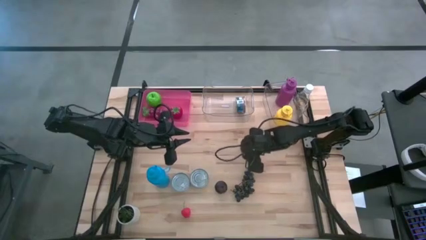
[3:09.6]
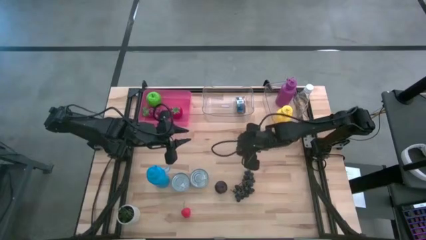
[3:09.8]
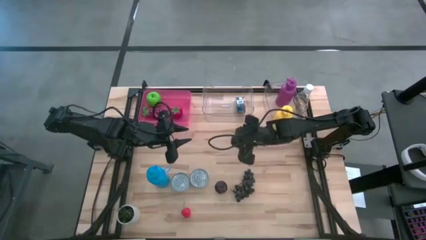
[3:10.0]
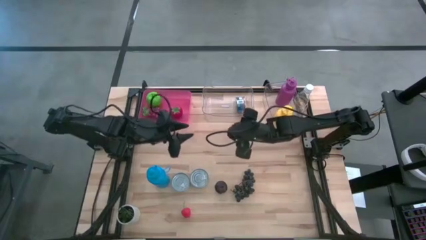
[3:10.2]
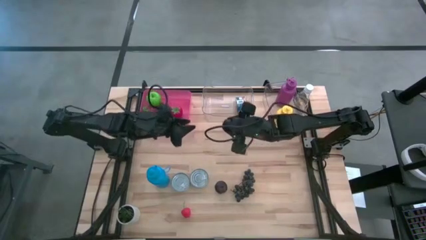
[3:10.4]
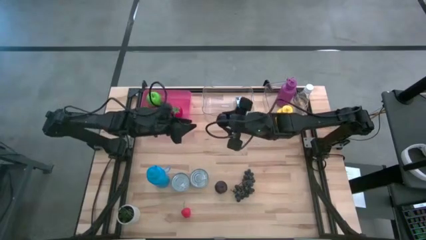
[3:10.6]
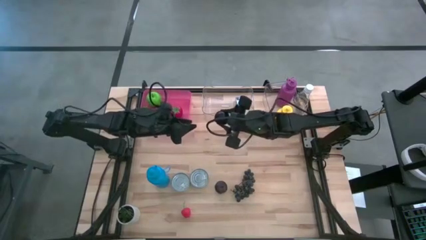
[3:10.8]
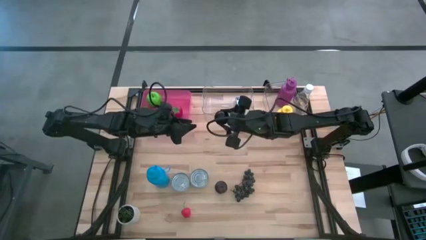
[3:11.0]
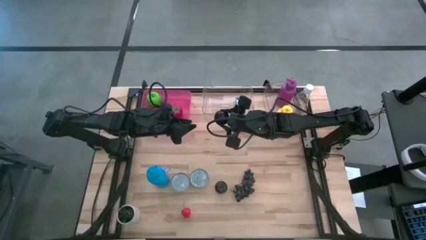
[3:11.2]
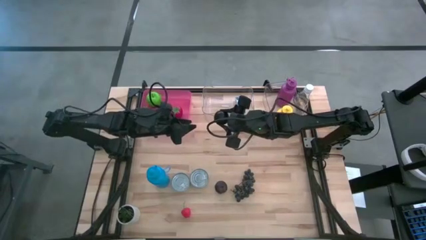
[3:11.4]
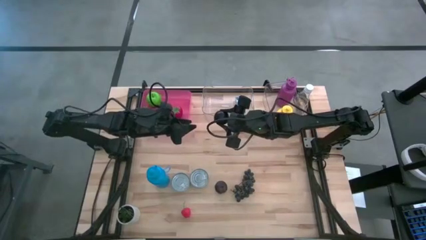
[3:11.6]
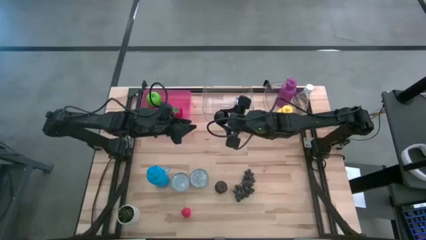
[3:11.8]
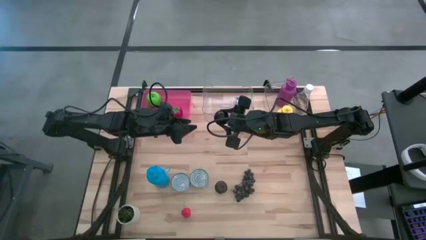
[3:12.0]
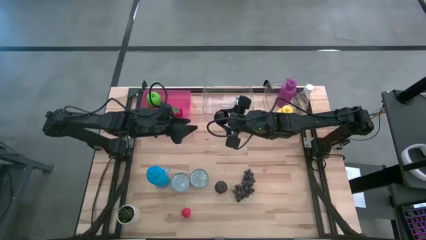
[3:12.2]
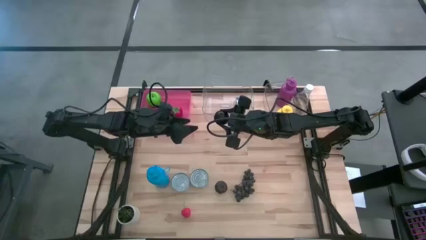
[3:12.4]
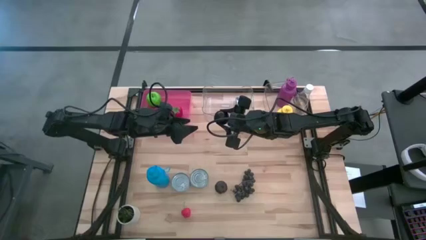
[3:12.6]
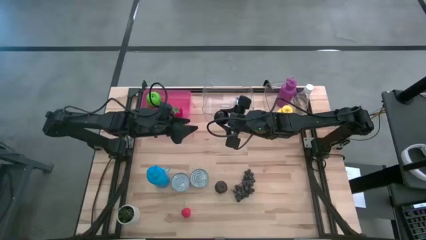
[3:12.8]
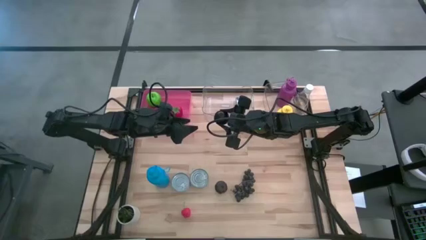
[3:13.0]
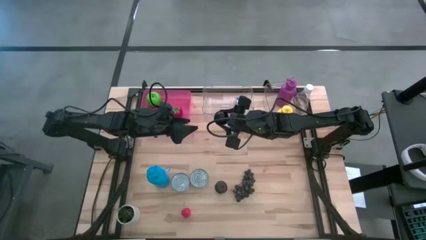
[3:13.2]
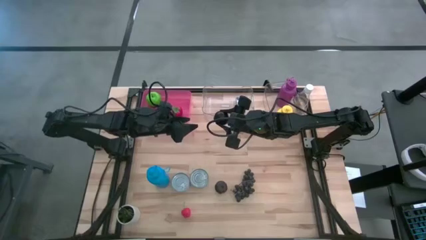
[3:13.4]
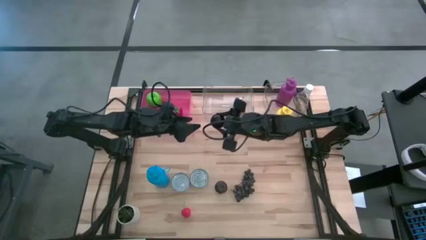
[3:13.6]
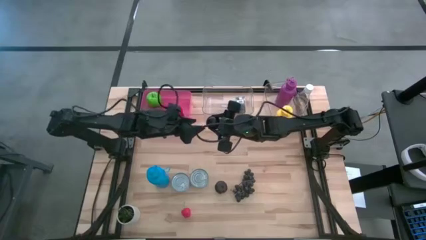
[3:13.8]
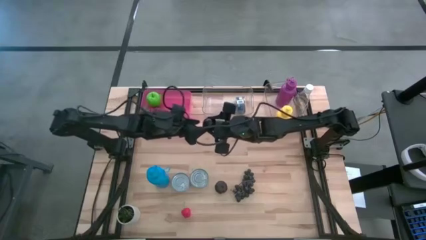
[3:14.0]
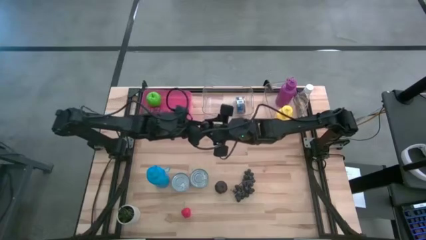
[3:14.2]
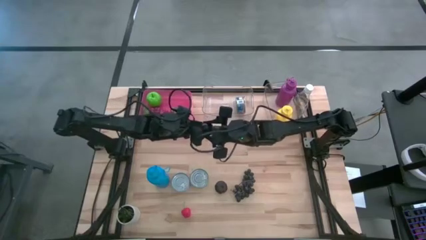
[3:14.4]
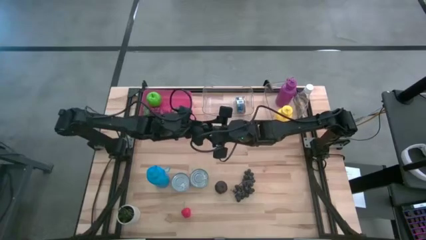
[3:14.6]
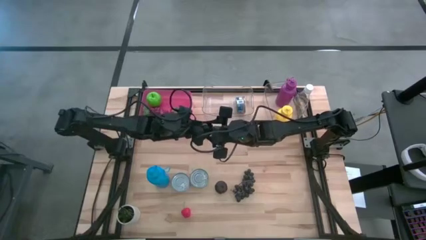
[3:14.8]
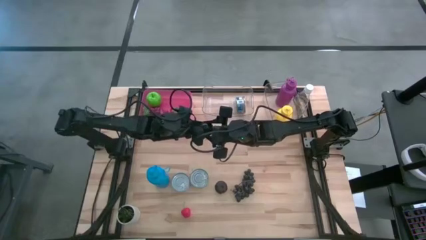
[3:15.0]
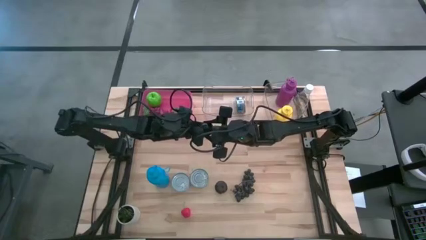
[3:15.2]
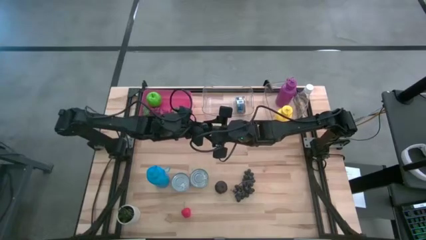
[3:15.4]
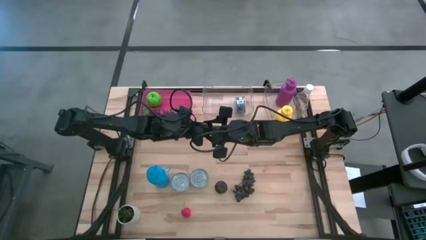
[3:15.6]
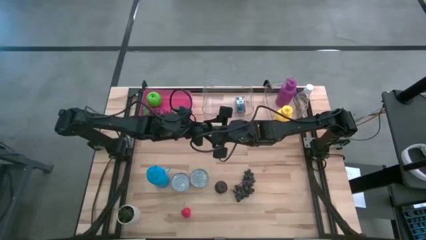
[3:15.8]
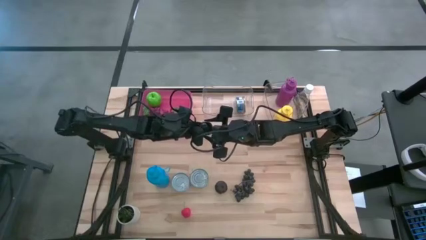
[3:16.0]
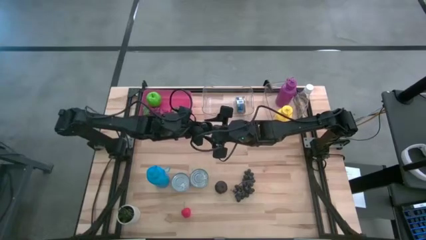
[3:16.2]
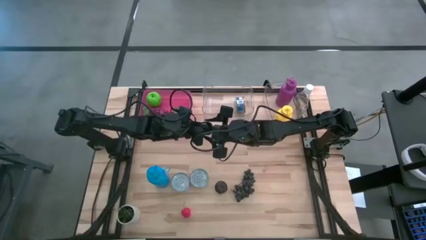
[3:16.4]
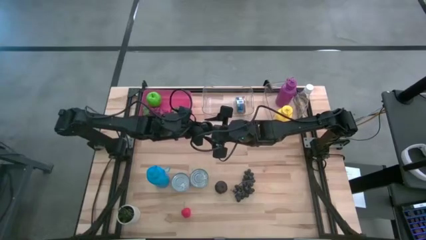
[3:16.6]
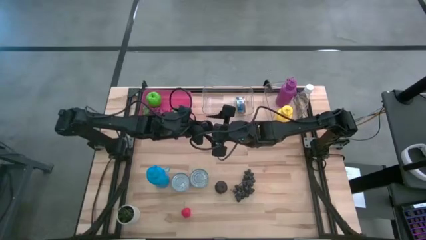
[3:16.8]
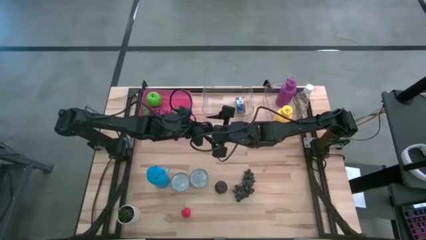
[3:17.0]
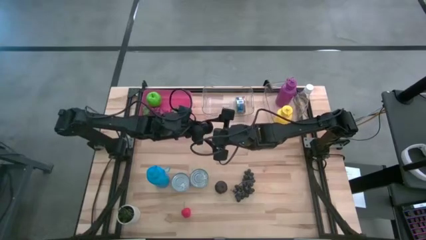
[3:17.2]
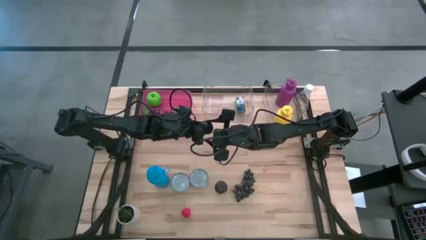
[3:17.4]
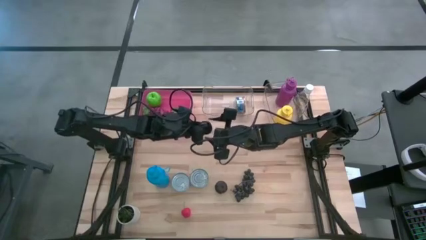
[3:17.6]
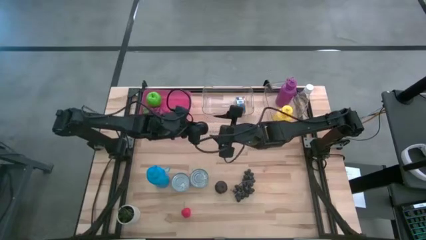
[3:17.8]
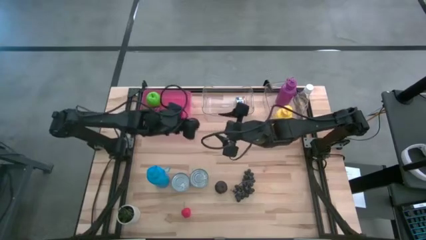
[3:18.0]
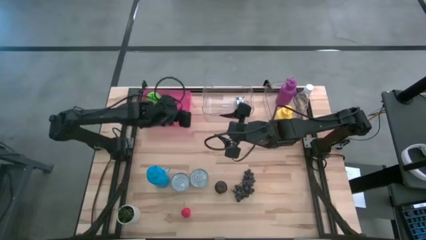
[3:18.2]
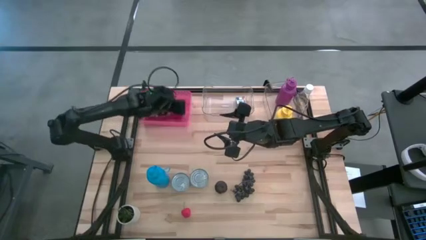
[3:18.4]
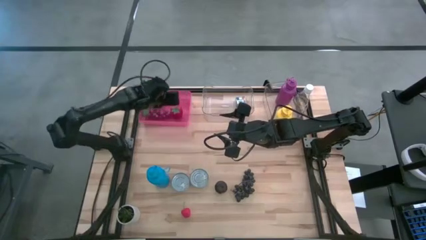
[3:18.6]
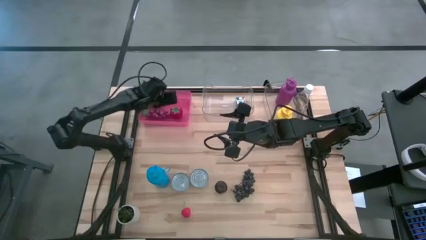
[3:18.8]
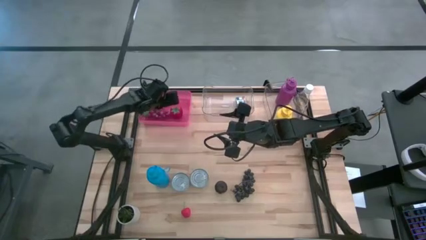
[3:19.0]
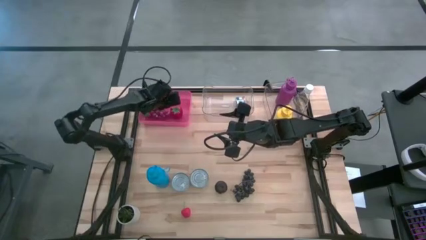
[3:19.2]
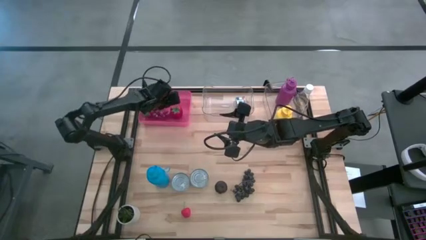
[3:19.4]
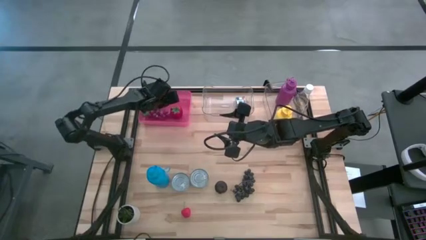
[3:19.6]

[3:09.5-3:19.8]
Task: Pick & Place Food Item
Put the right black plum into the red transparent bin

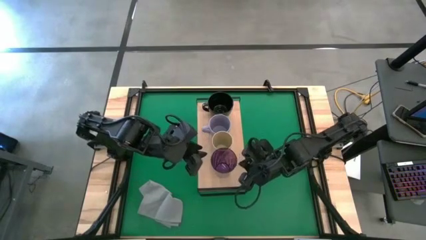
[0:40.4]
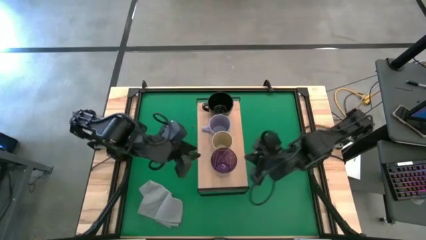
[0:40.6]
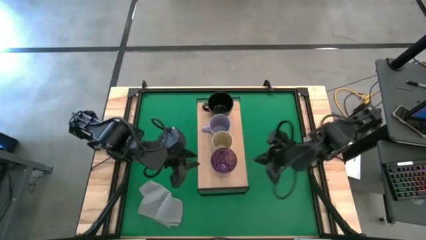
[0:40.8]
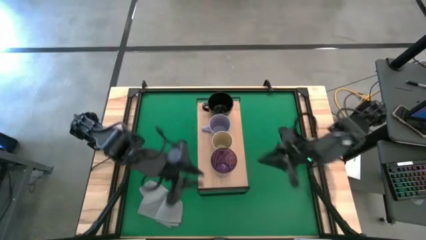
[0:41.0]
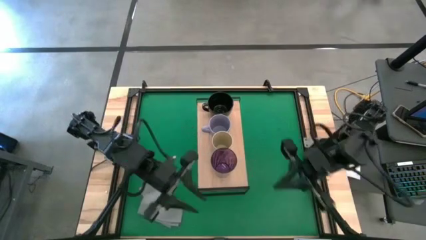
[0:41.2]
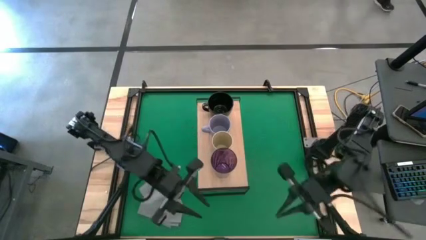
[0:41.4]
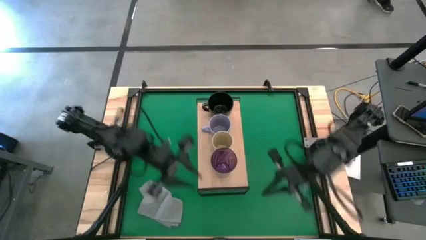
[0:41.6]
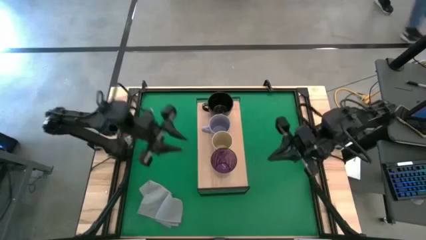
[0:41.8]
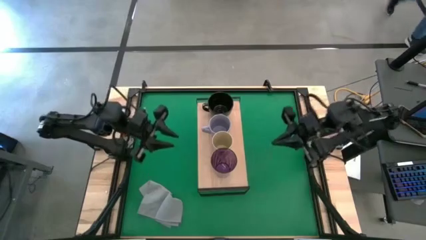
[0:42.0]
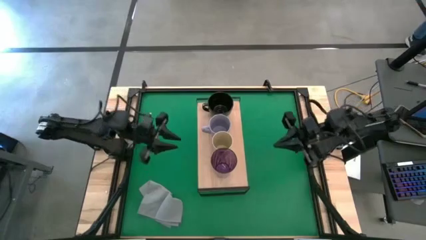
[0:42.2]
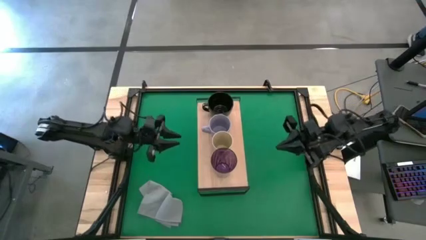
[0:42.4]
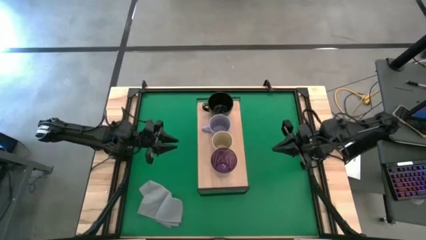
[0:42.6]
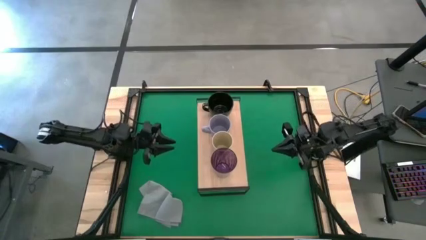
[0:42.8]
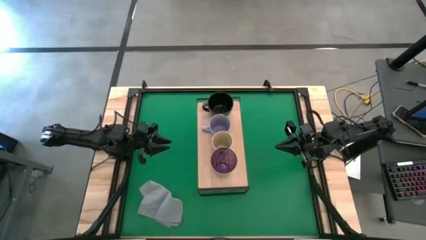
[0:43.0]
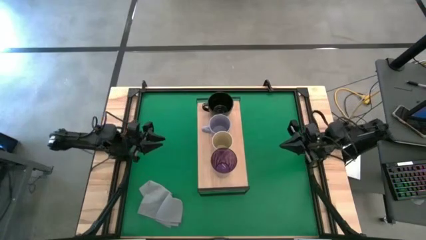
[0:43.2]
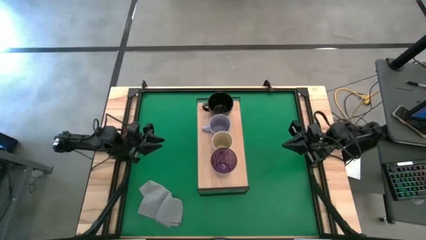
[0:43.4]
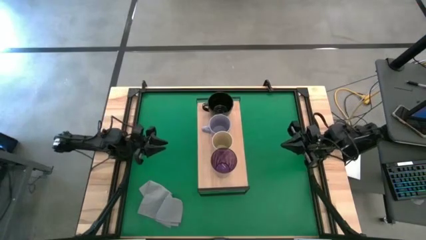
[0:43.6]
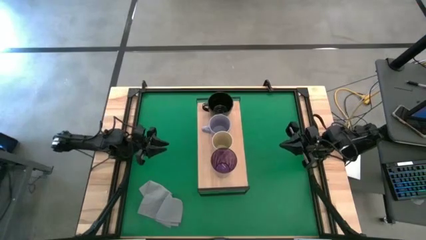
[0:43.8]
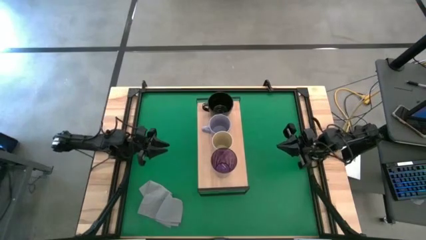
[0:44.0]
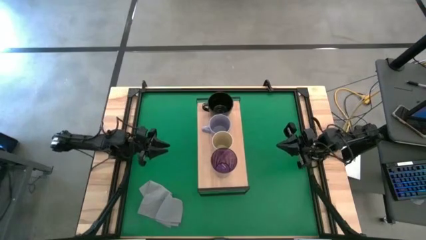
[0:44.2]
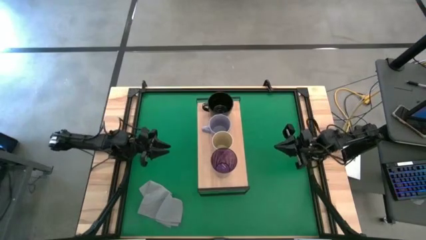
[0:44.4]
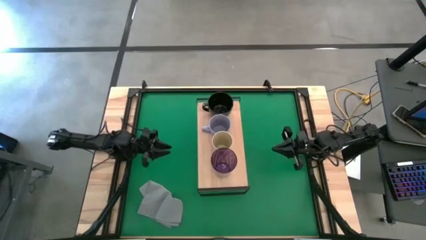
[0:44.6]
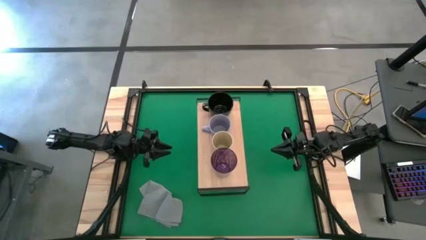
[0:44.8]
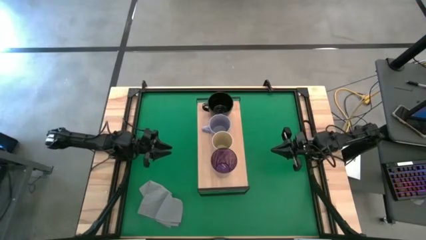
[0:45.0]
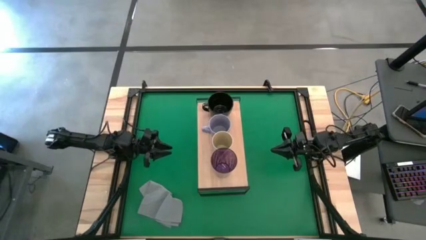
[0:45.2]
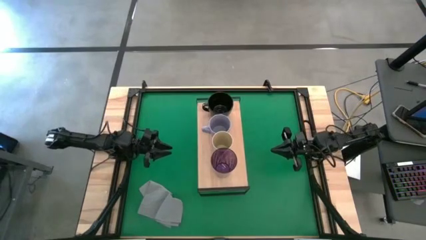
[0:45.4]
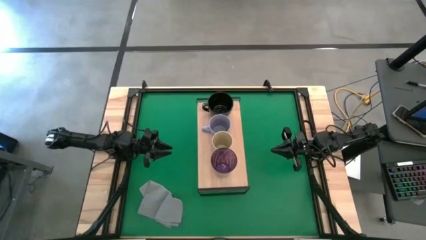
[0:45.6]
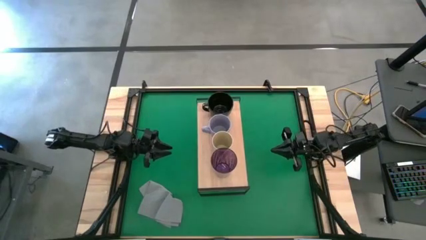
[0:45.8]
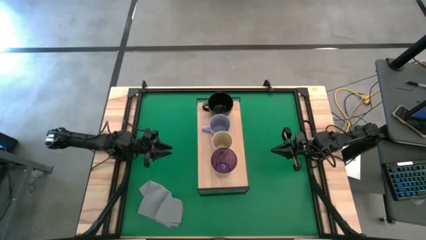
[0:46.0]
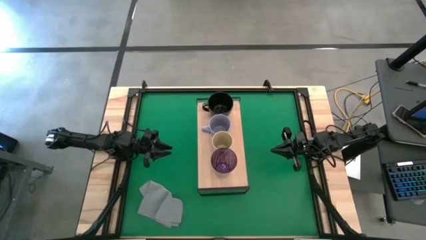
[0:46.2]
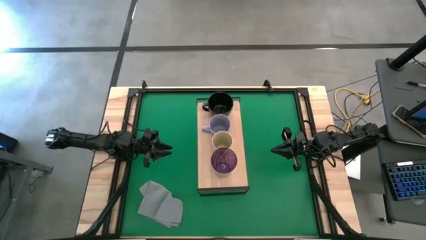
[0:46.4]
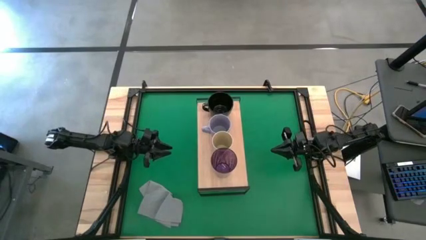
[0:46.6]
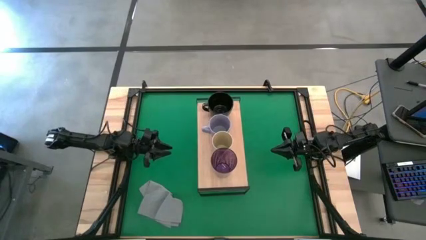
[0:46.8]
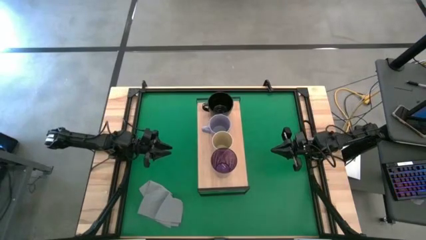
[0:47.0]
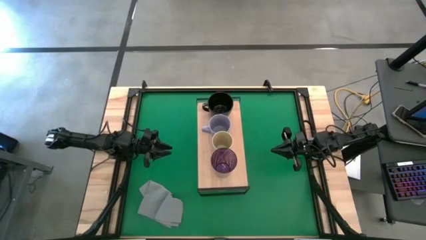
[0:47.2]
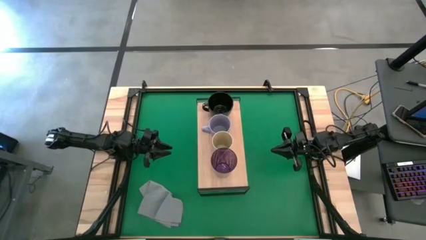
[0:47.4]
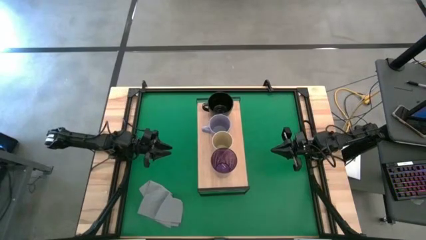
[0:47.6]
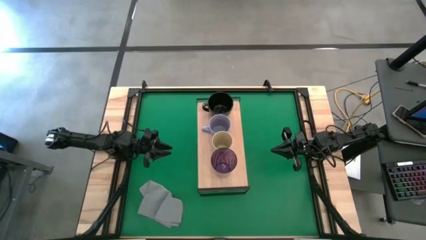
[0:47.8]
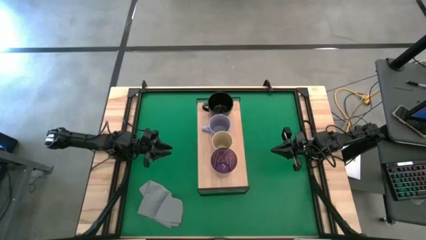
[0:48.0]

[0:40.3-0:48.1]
Task: Stack small to large cups/mugs on shelf
Return to Home Position
